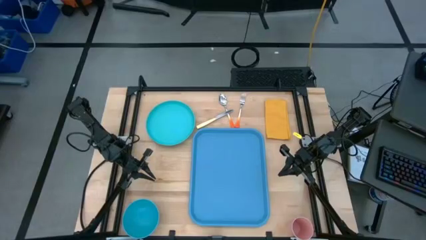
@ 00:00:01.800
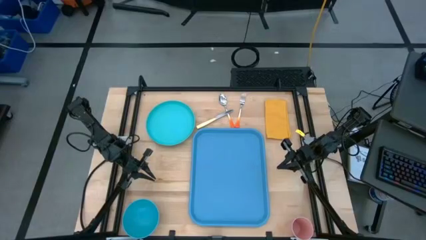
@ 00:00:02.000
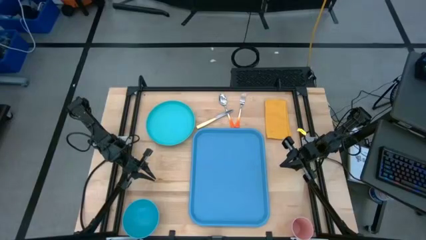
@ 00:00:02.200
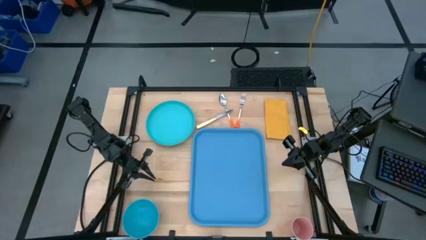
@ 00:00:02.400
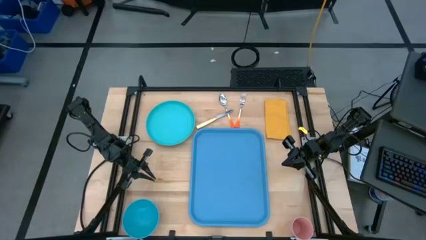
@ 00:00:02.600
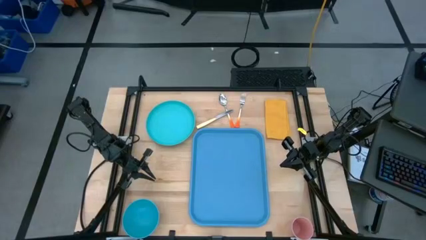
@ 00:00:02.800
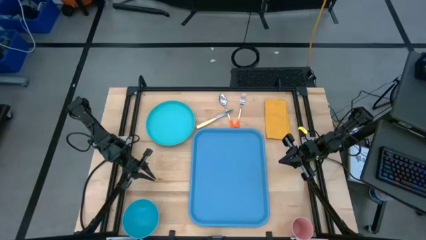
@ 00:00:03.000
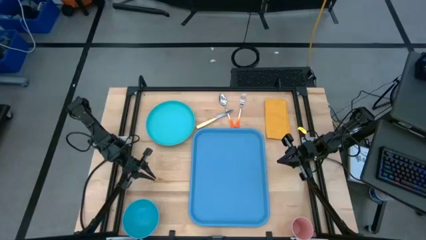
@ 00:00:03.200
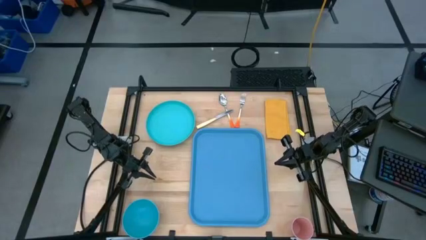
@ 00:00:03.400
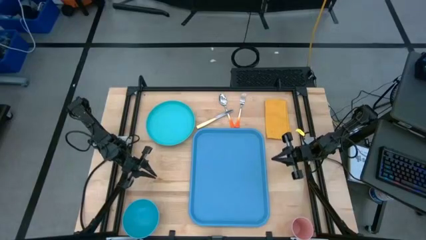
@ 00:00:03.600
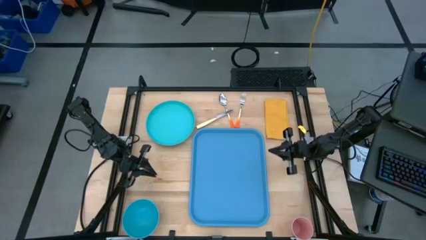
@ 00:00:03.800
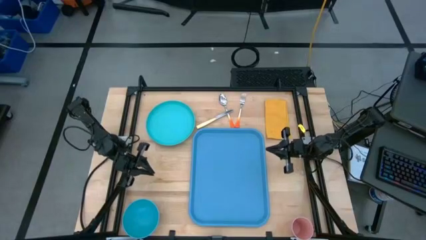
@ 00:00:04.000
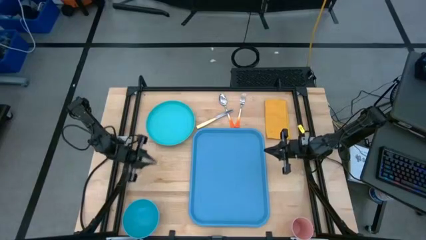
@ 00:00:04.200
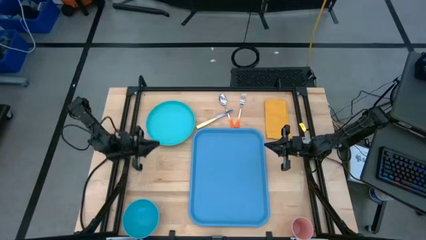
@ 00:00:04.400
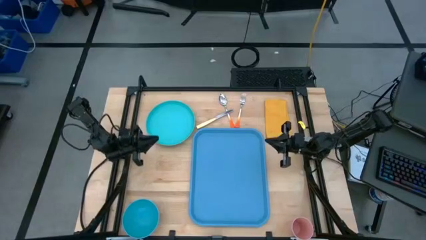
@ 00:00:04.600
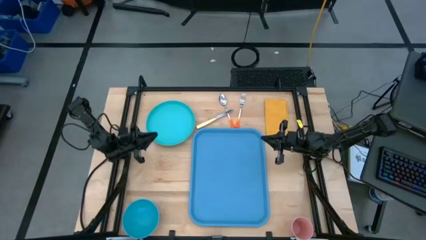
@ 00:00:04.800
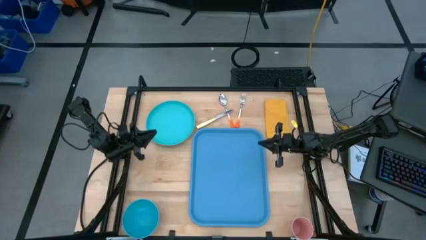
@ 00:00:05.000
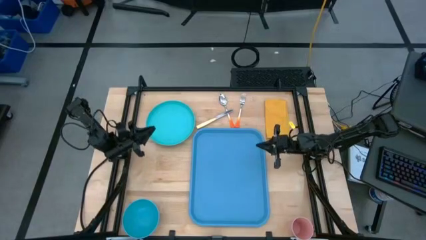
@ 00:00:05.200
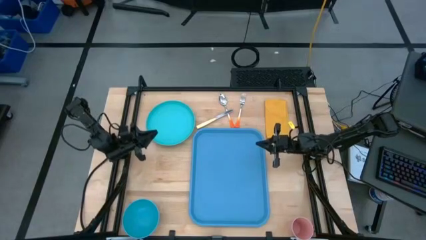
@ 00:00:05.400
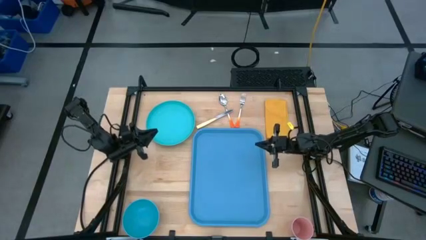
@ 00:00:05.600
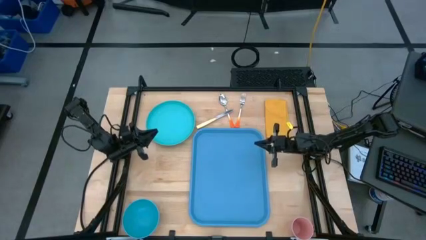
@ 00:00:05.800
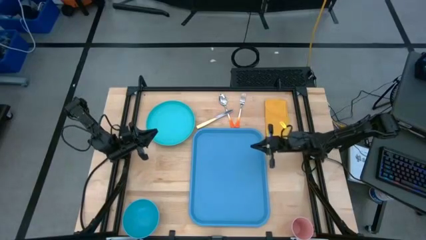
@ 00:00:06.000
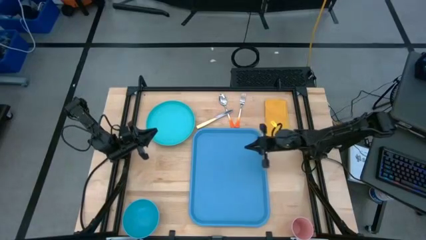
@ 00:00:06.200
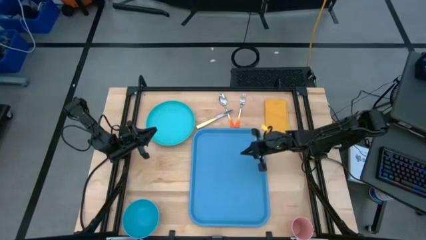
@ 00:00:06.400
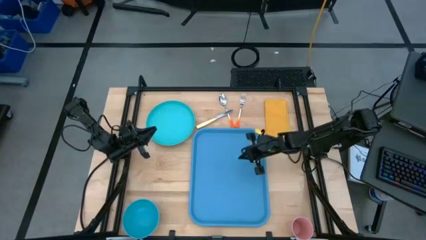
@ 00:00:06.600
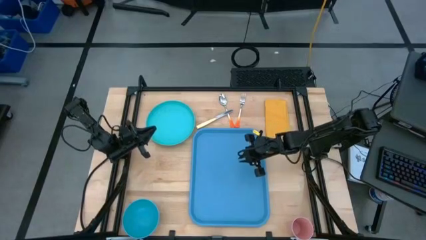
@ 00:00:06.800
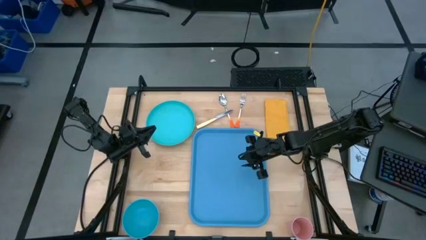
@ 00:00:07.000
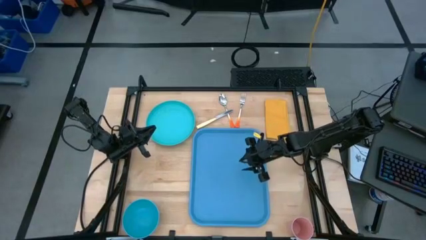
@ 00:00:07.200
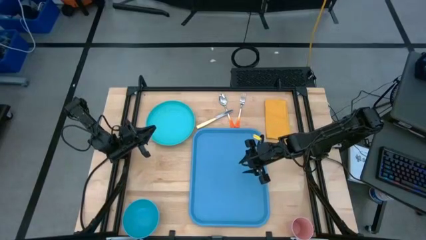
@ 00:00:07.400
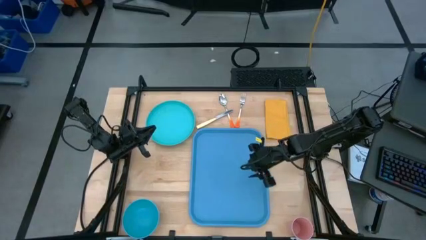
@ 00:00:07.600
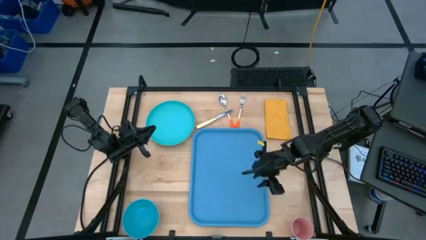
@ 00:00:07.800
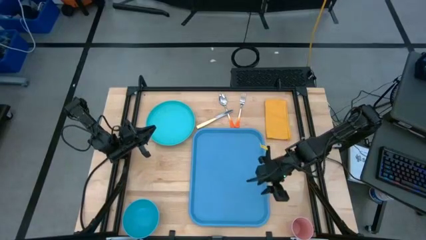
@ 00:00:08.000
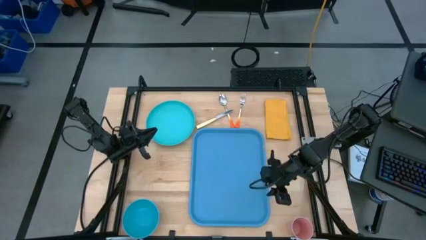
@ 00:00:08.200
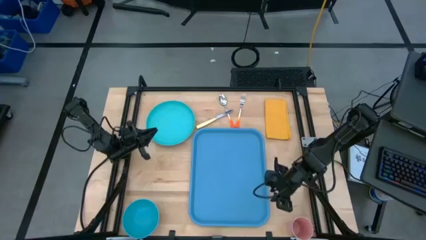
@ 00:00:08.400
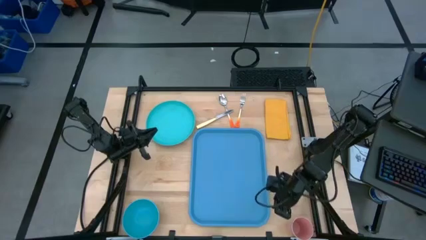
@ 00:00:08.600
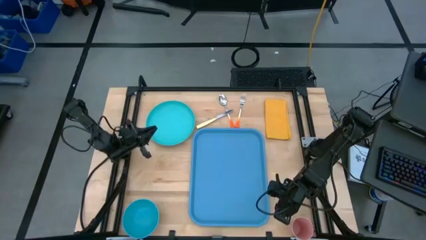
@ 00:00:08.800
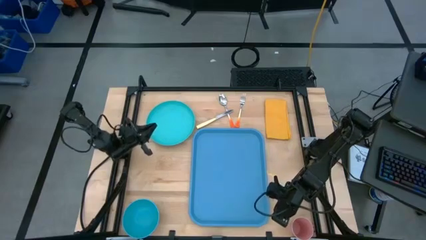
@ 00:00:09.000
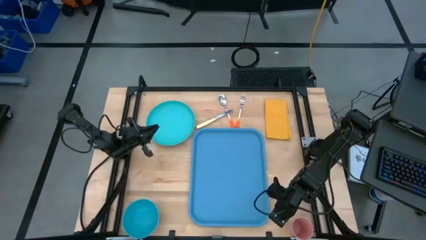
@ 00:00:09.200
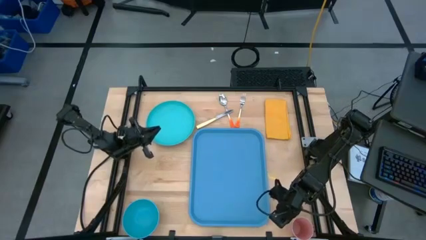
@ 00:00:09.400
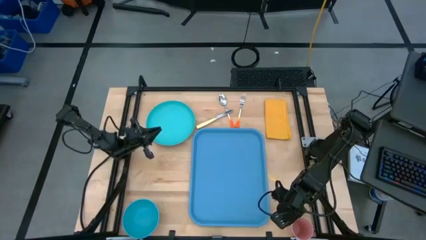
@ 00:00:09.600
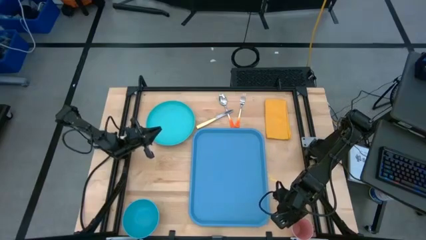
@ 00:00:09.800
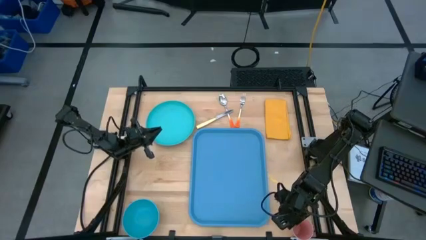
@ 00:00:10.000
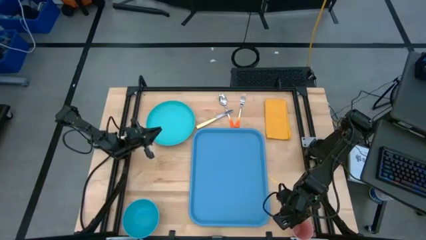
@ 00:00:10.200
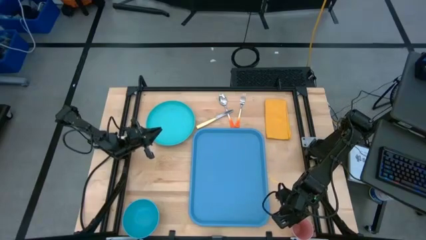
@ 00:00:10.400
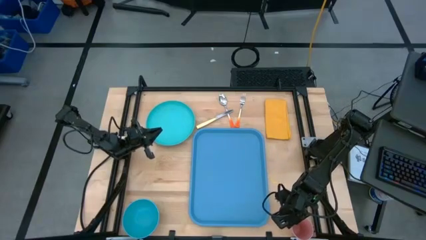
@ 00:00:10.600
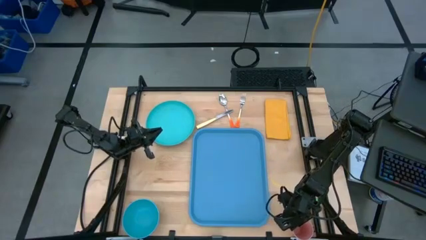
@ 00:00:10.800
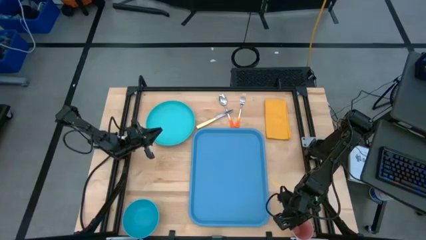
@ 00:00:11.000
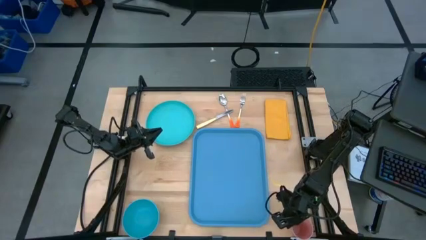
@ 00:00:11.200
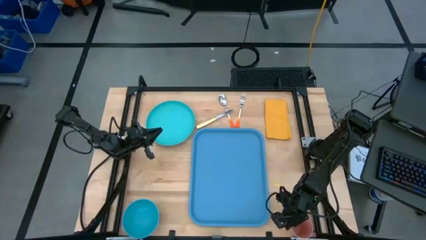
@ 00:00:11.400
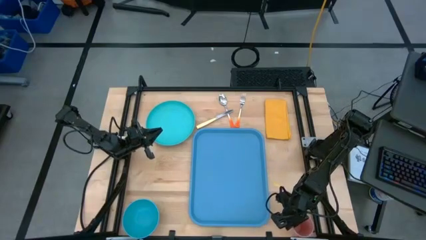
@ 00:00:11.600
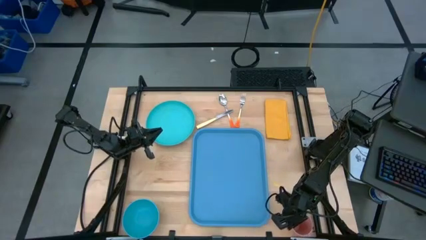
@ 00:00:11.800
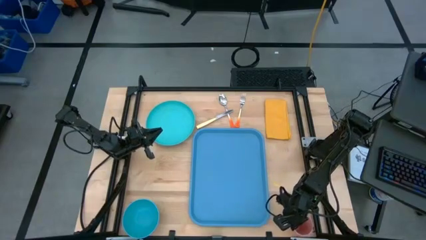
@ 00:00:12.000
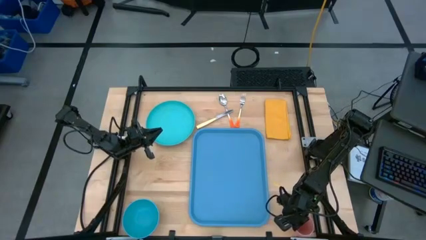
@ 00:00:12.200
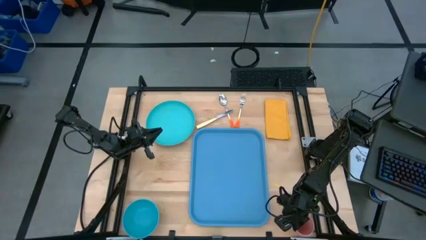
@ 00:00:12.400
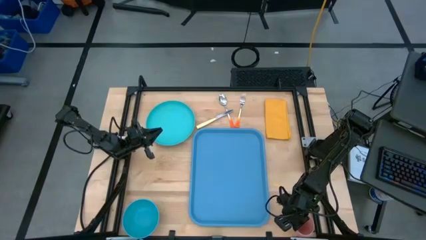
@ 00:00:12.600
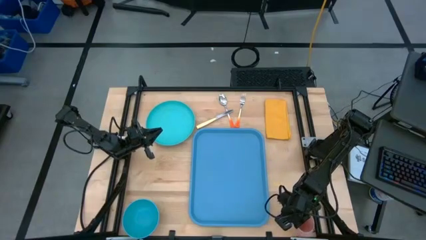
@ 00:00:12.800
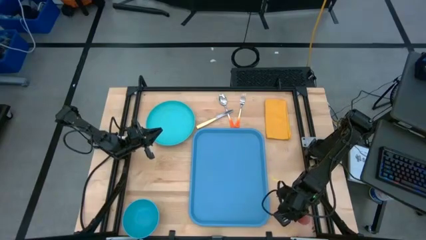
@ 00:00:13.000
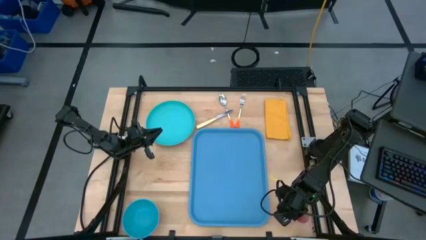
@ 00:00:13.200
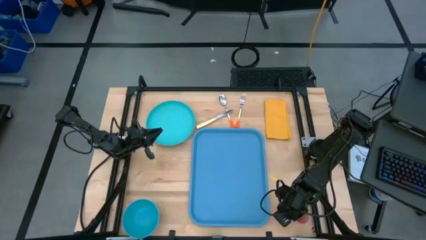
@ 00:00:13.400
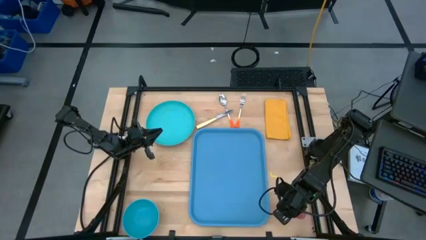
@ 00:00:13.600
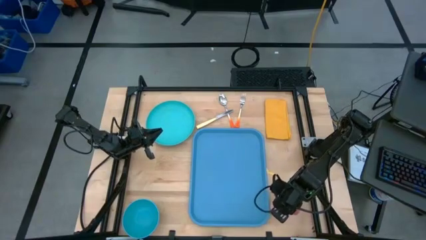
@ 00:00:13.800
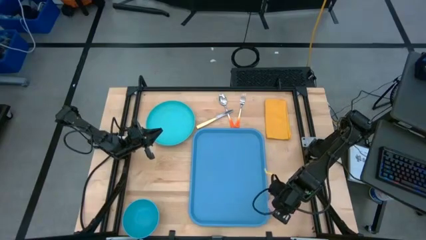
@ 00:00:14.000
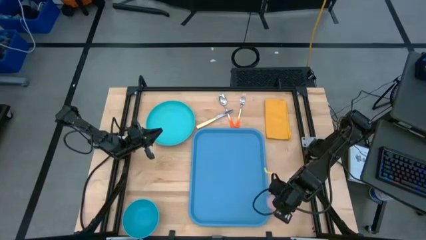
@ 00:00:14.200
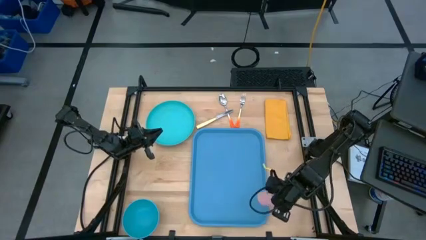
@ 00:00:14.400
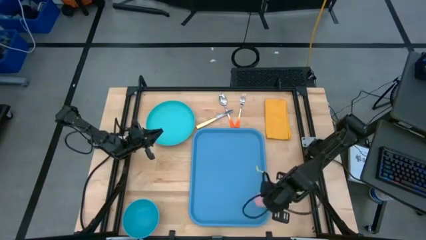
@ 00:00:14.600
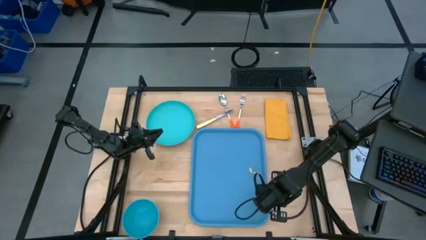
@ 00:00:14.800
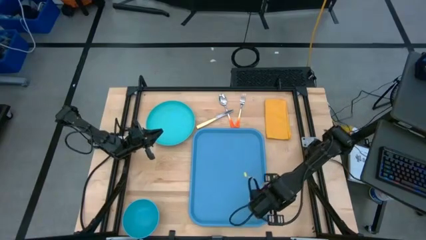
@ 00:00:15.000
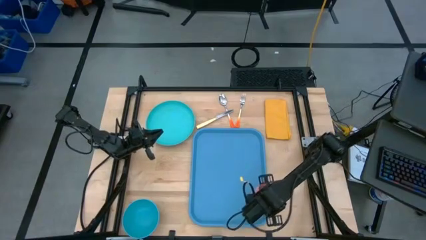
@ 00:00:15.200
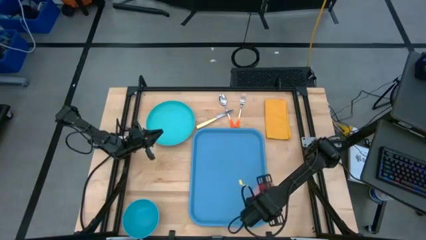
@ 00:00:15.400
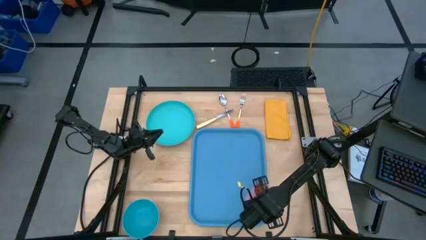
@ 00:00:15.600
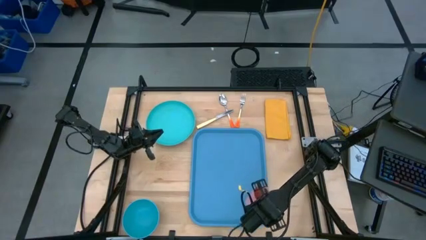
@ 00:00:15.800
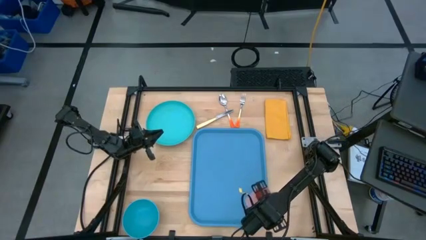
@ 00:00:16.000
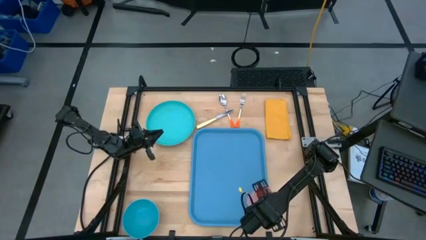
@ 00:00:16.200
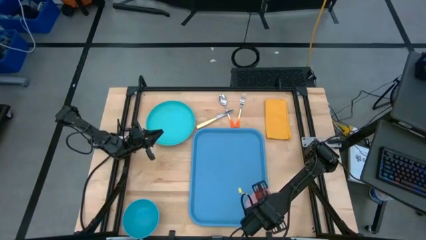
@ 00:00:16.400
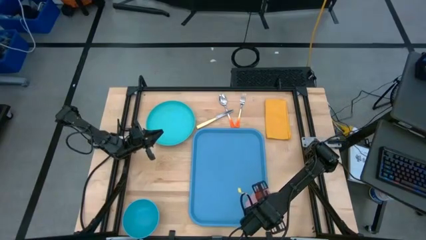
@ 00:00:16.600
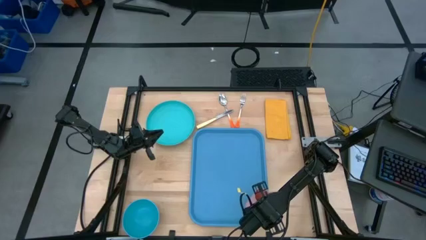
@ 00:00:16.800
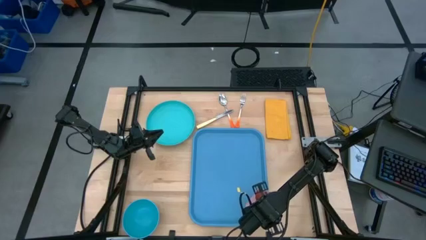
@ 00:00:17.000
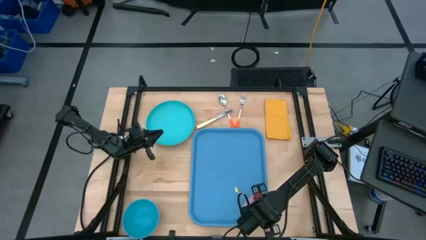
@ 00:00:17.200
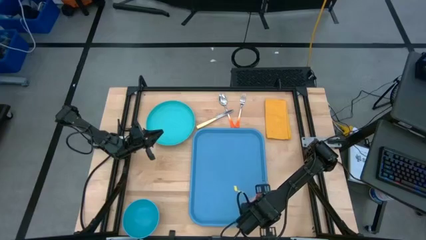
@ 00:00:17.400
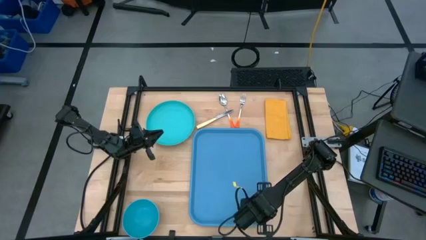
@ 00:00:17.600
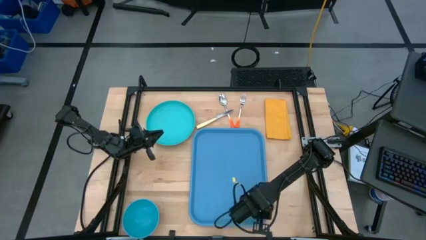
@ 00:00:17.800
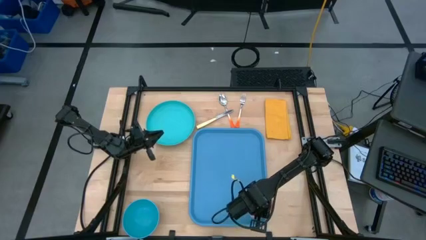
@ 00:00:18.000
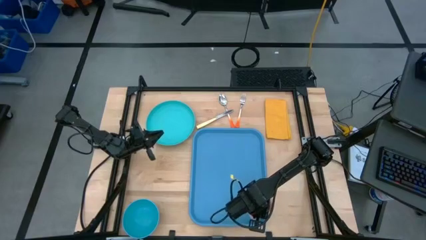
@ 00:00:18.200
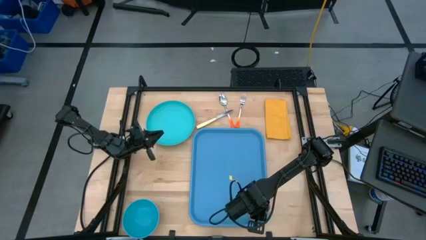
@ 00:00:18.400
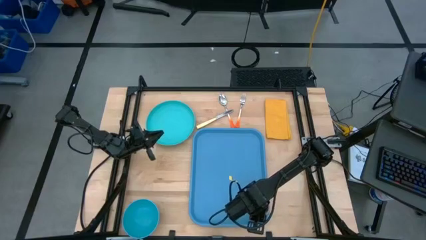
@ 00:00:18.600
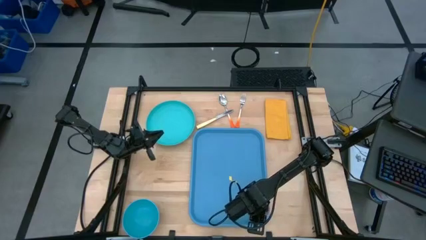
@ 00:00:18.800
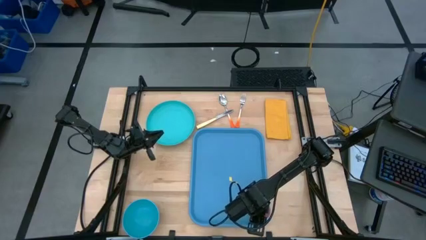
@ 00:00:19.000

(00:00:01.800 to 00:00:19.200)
Task: Set up tray
Put the pink cup on the blue serving tray
